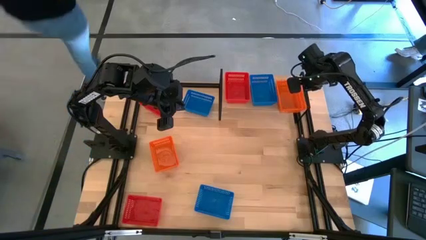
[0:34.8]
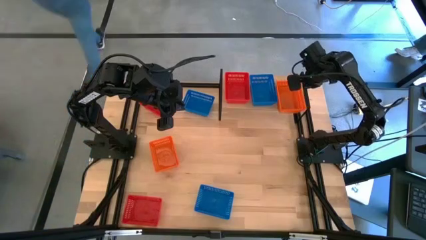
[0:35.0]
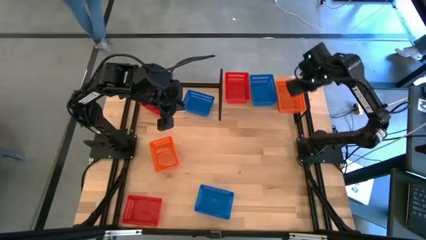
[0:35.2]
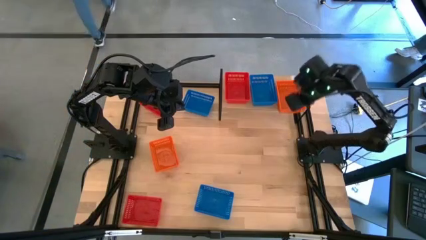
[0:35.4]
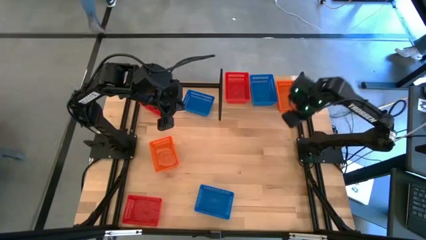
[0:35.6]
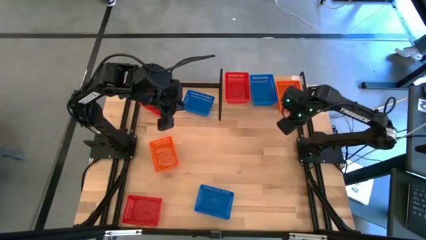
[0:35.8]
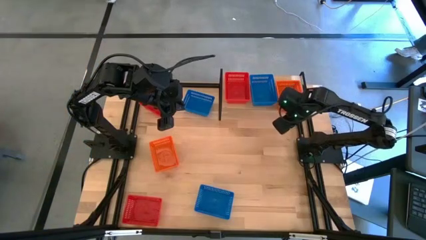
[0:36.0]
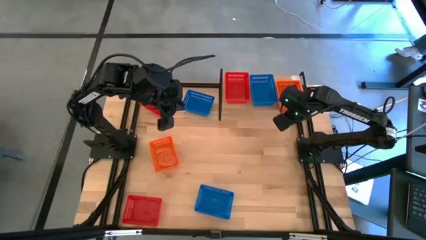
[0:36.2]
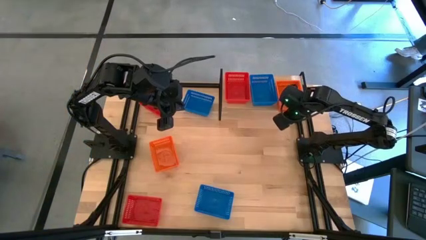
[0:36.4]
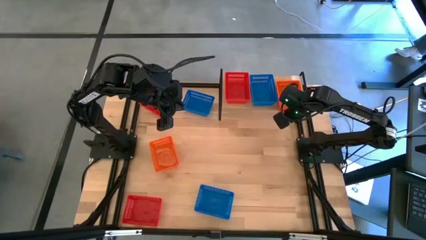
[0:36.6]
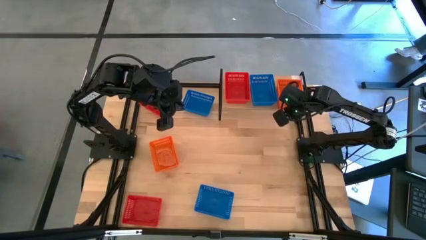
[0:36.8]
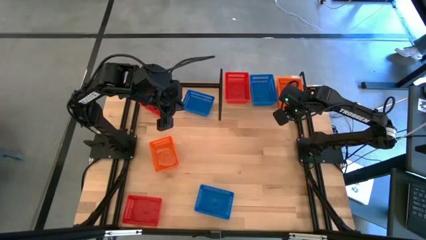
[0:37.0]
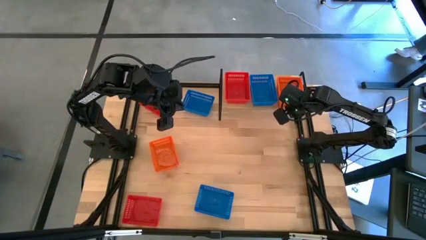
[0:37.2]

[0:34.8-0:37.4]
Task: Stack baskets on shelf by color
Adjust the stacked orange bins on the shelf

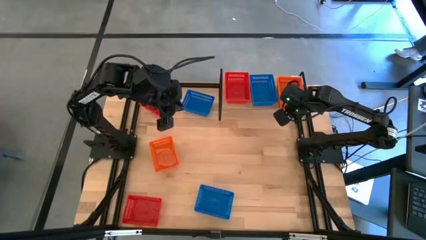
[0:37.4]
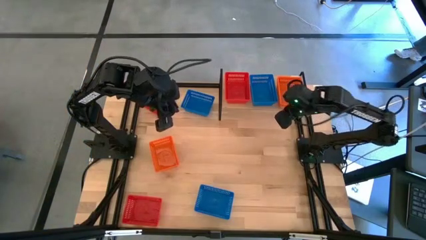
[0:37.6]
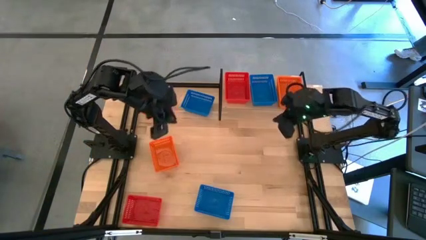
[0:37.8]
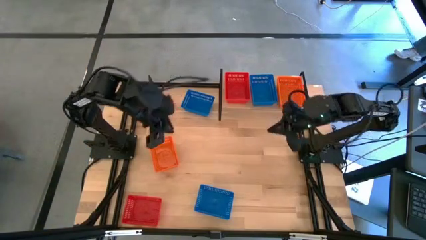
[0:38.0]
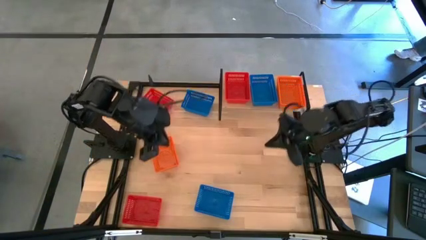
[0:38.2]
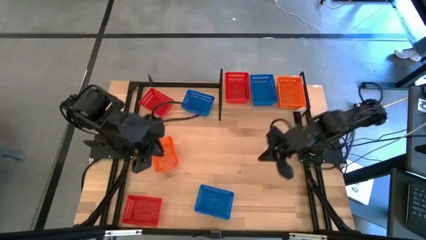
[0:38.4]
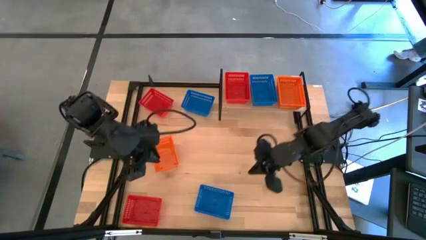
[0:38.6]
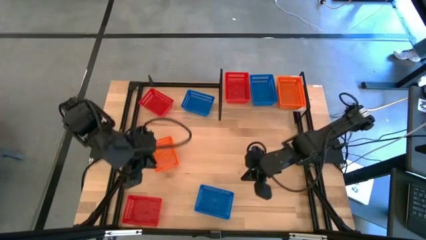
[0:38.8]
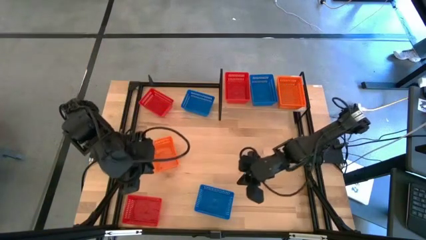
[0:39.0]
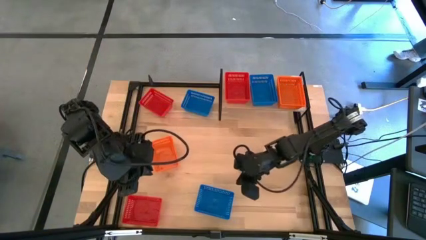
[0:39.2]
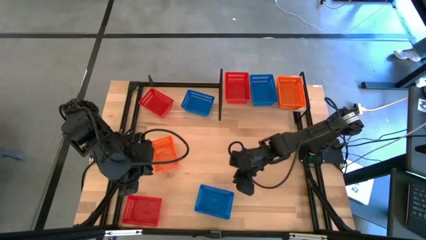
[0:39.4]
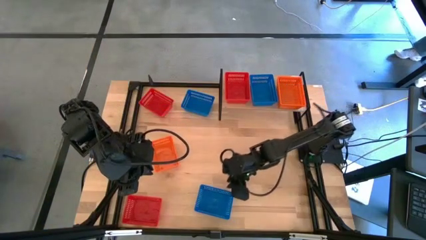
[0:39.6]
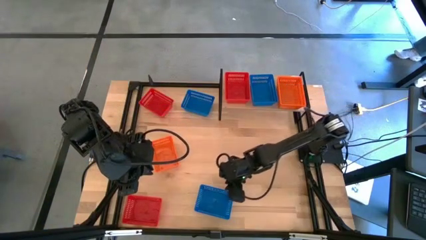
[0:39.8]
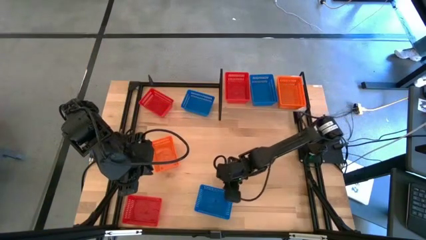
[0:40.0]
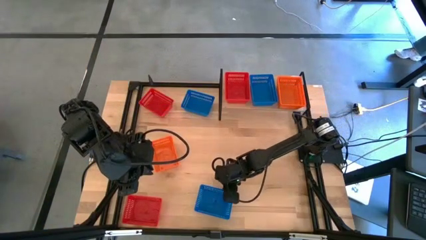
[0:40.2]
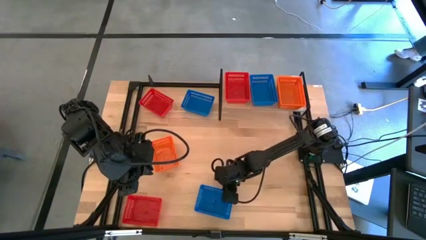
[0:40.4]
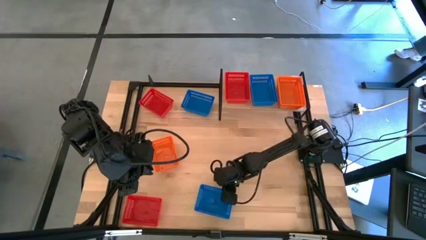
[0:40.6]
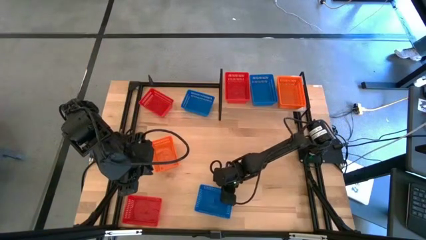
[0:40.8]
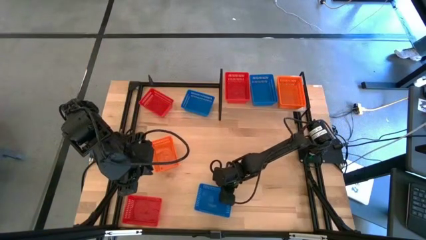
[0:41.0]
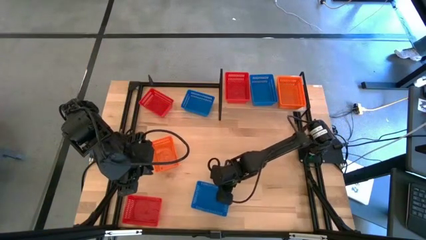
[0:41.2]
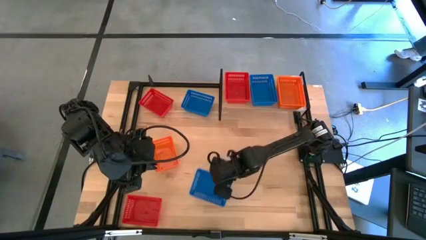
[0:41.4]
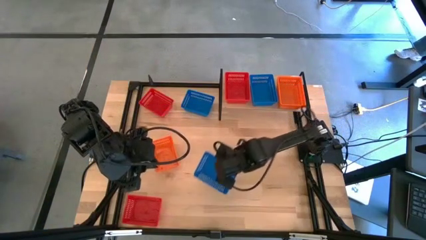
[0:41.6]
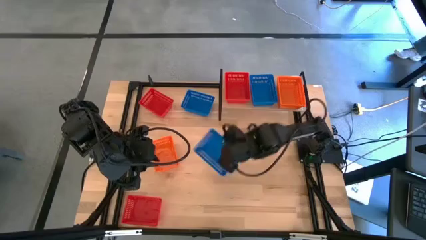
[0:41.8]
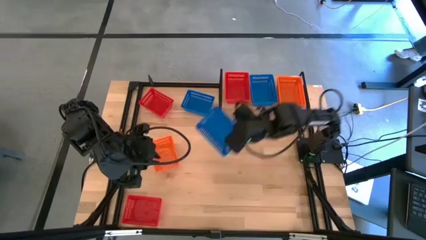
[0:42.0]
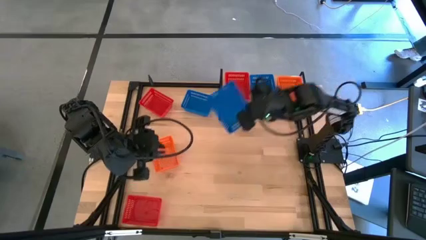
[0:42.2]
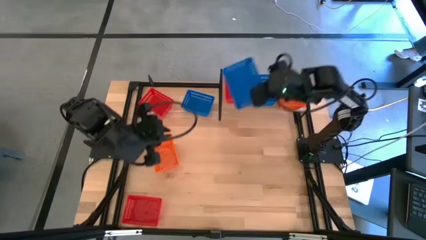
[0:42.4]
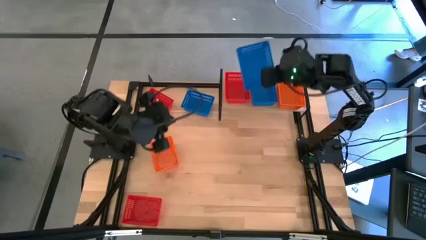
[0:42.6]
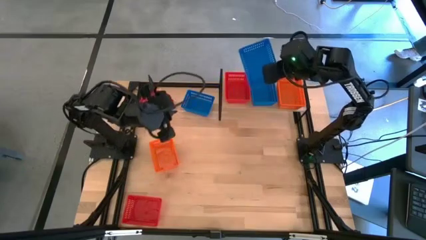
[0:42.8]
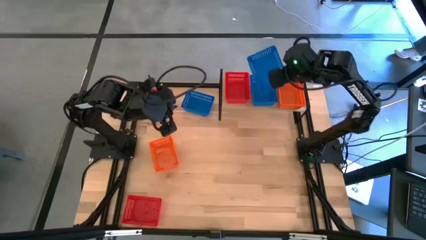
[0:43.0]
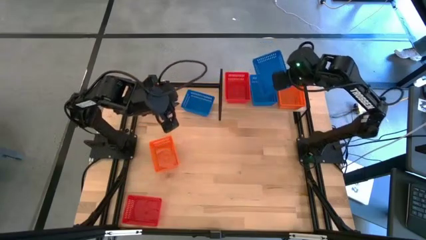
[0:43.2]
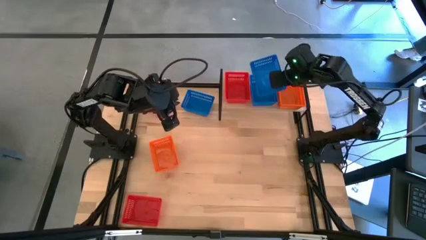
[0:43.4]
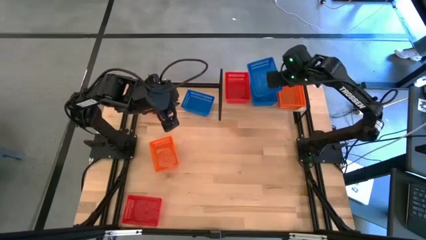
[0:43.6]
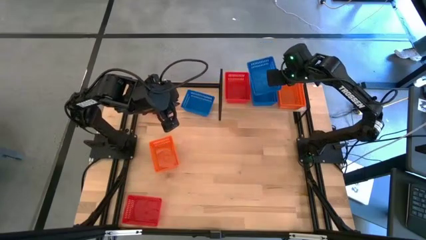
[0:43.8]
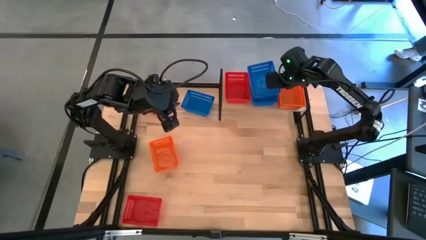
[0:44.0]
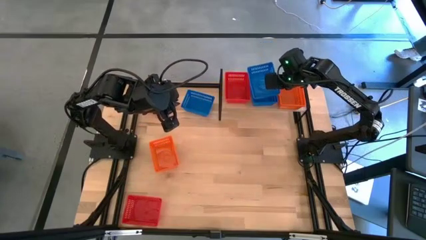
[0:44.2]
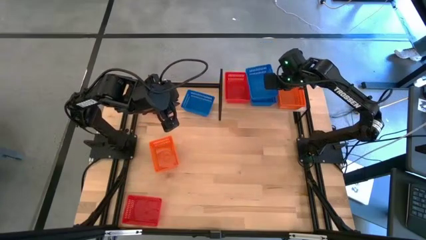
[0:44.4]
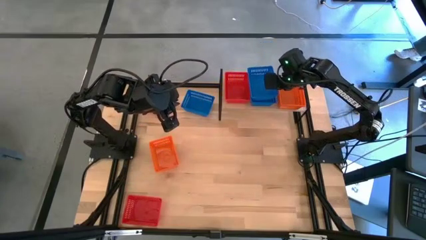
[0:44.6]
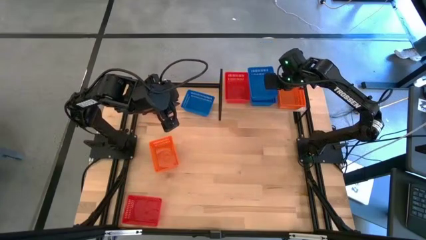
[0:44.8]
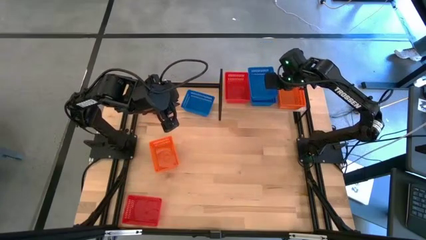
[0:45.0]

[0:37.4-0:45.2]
Stack the bottom blue bin on top of the blue bin on the shelf

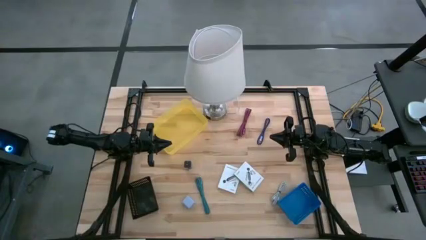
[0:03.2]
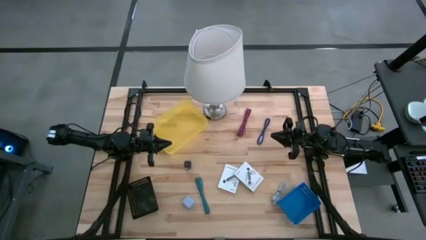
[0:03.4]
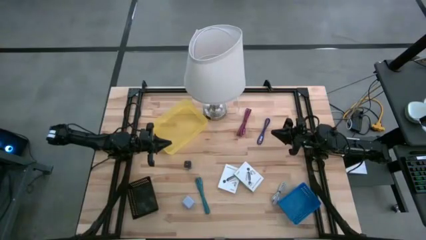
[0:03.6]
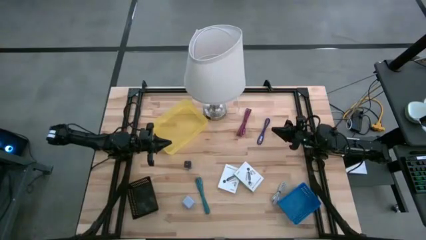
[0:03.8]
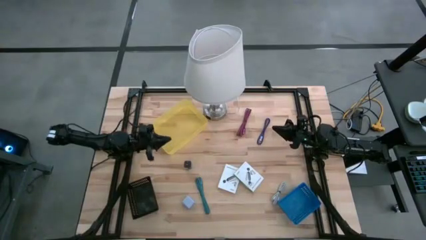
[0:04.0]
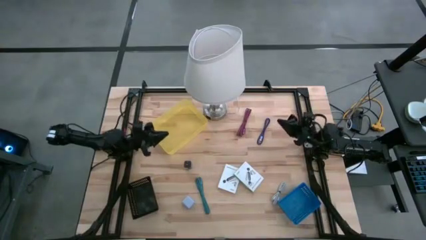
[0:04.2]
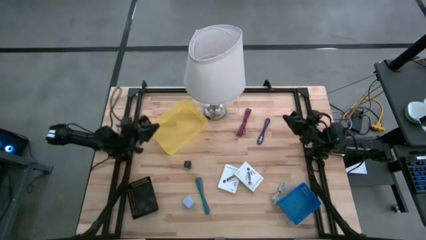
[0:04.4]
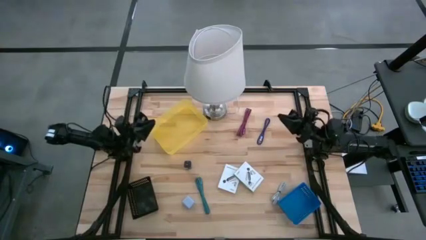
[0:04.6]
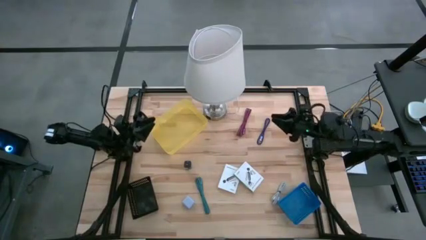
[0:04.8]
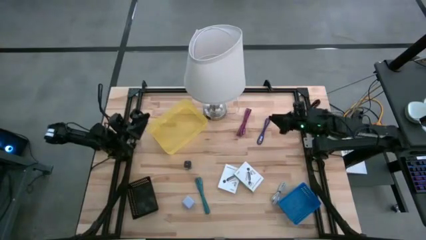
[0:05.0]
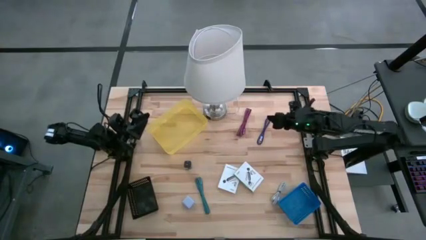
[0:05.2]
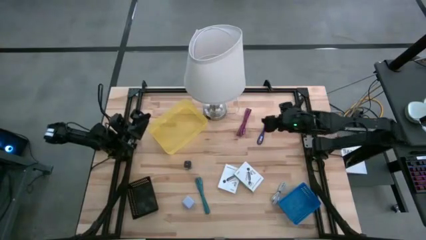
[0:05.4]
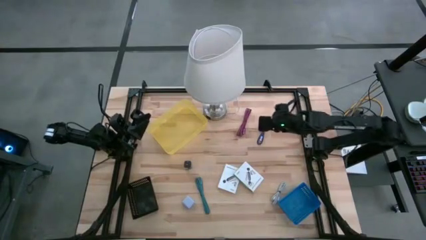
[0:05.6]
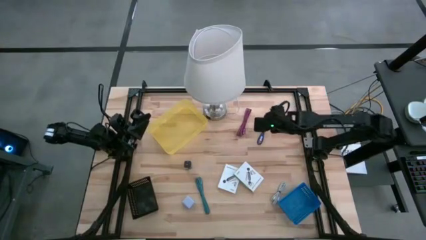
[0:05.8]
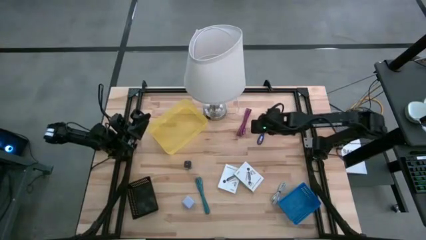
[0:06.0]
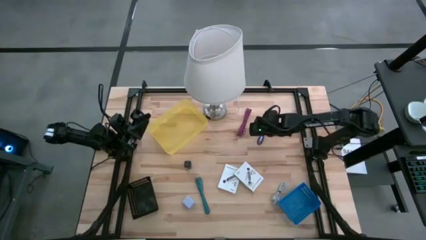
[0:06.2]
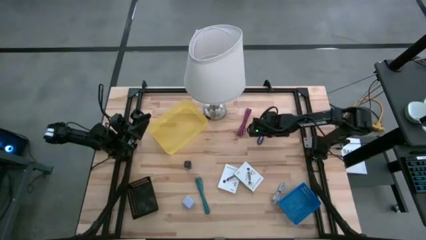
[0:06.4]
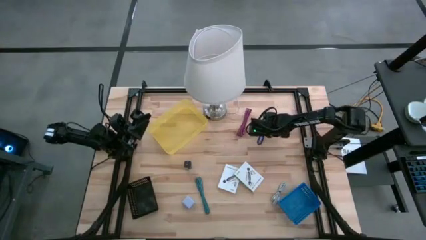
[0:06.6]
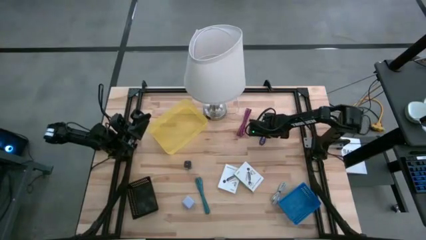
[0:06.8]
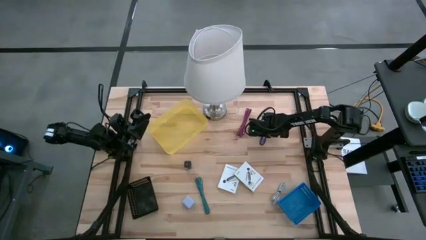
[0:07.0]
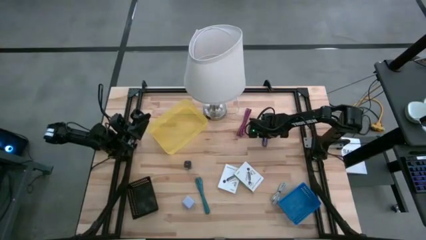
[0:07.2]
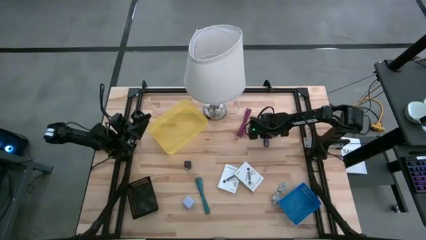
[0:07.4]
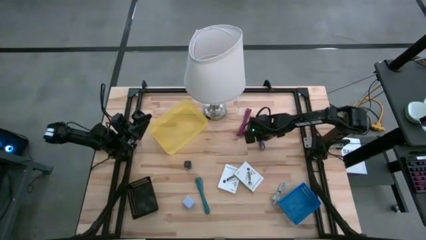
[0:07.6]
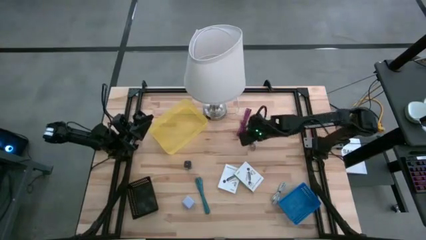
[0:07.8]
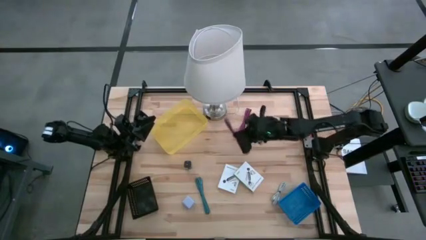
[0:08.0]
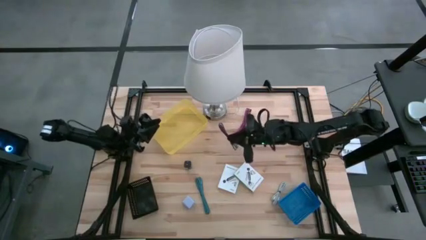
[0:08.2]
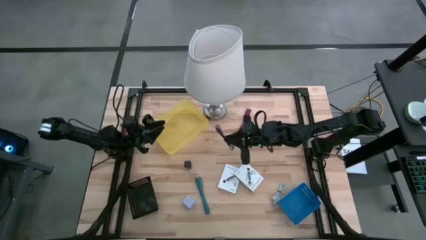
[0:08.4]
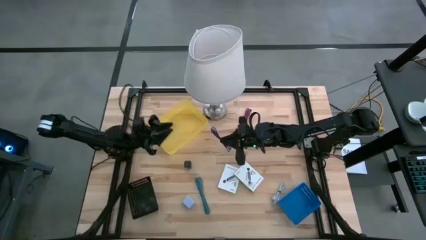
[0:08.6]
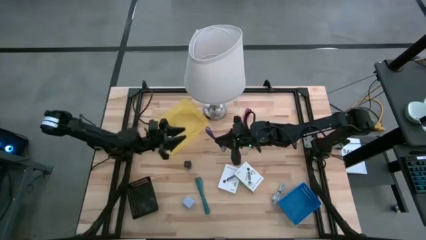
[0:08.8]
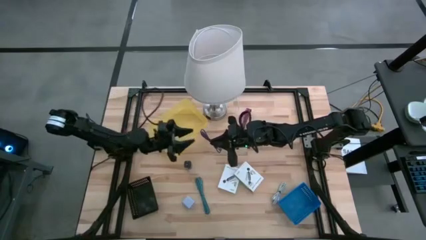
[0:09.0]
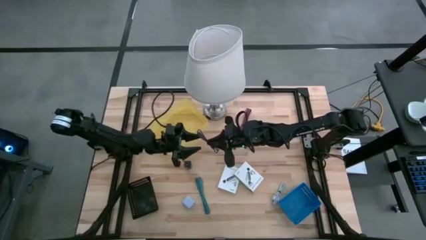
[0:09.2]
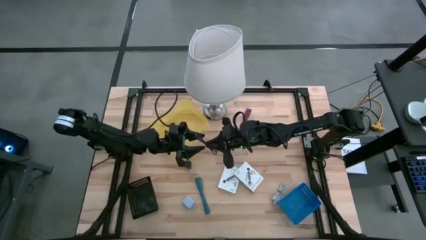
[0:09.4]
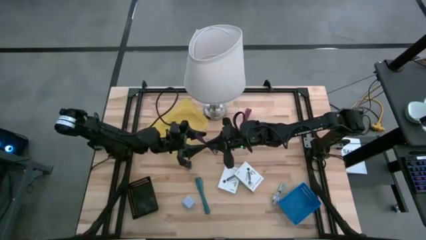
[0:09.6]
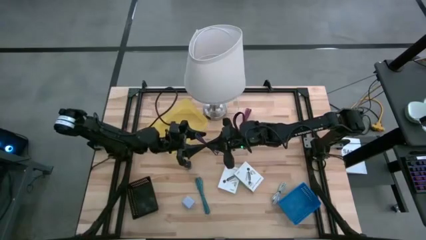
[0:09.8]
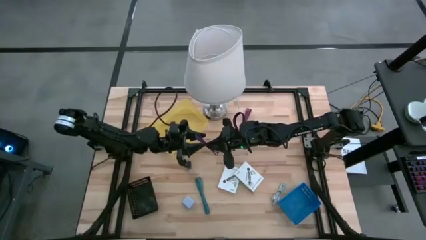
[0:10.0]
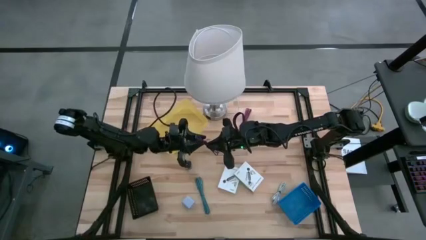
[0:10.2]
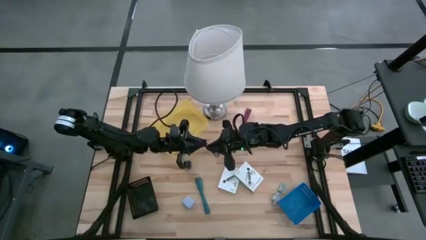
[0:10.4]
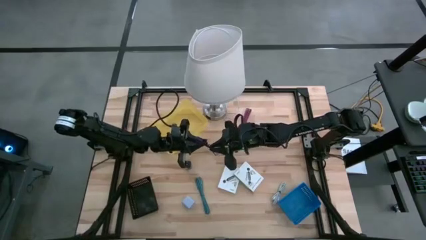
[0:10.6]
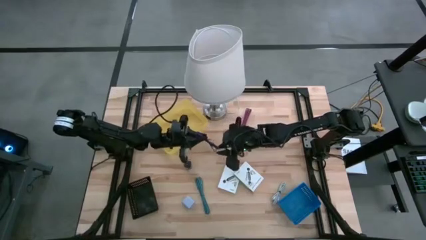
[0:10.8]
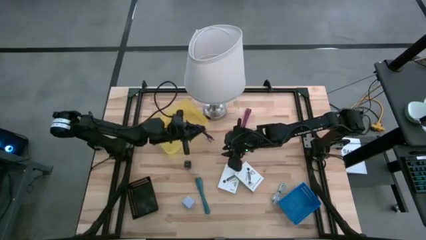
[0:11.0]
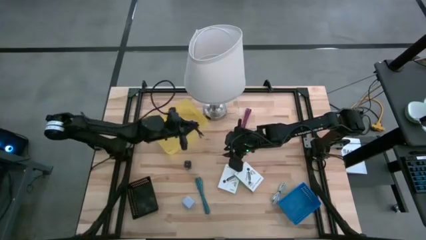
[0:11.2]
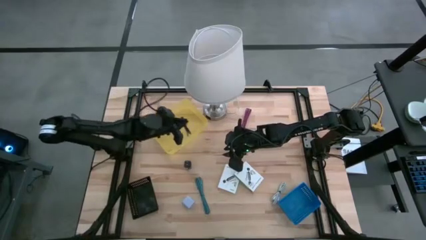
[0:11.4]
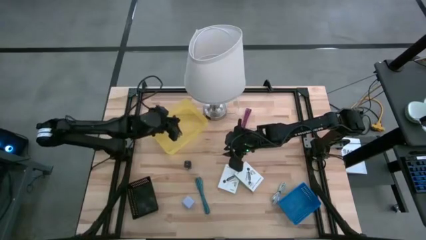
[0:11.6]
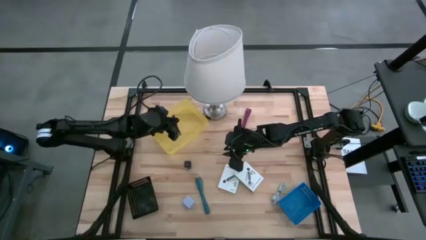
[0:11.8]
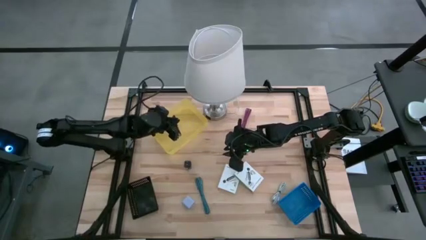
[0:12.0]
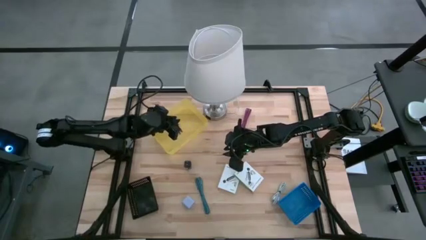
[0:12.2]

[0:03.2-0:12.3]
Task: Pick and place items into bin
Put the blue USB cable into the yellow bin
